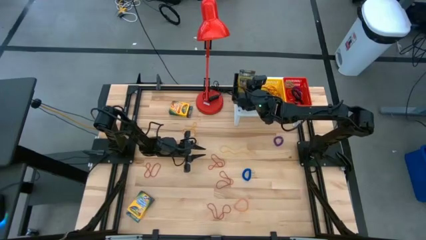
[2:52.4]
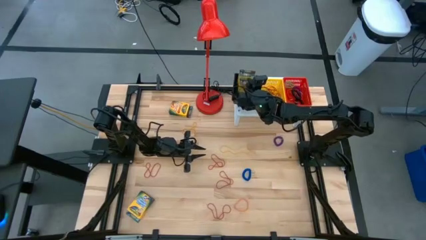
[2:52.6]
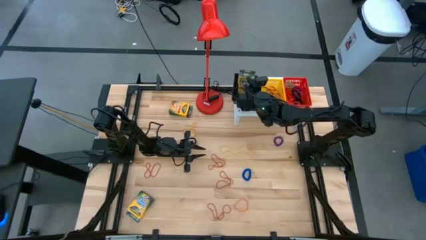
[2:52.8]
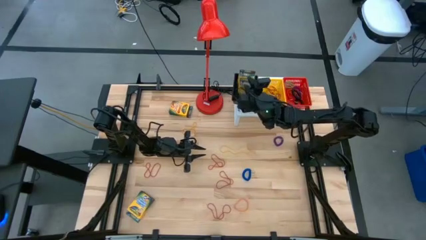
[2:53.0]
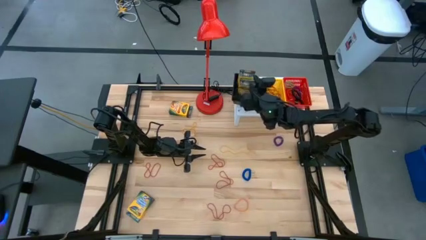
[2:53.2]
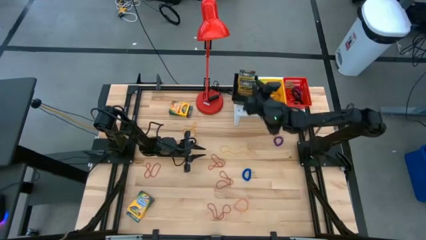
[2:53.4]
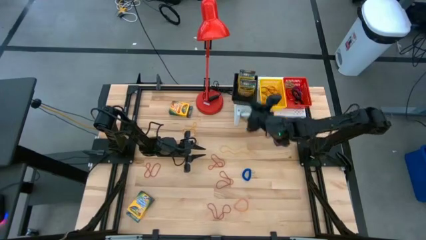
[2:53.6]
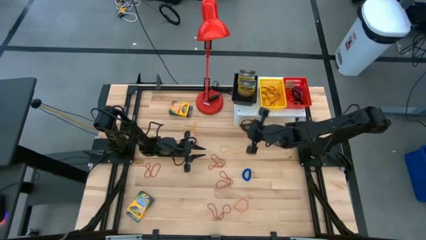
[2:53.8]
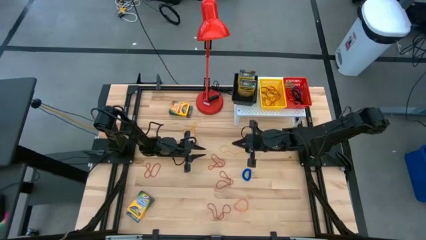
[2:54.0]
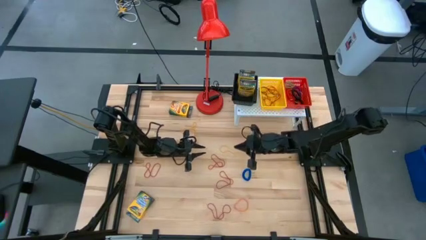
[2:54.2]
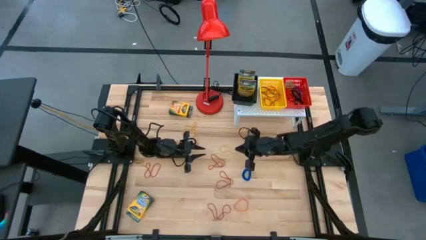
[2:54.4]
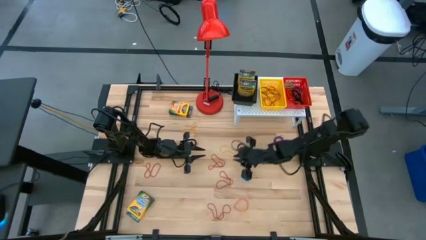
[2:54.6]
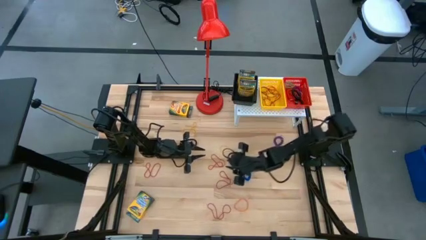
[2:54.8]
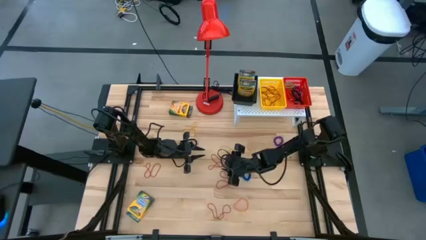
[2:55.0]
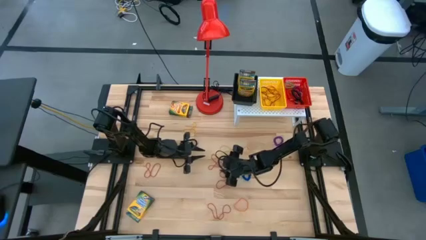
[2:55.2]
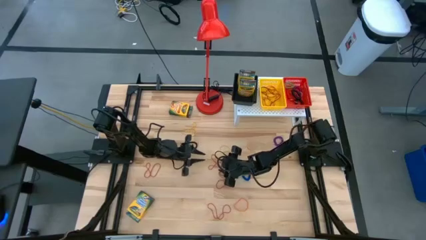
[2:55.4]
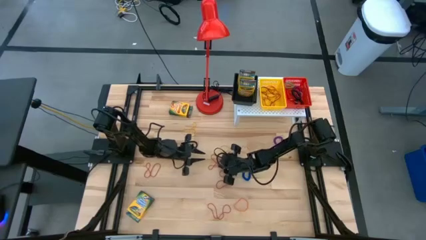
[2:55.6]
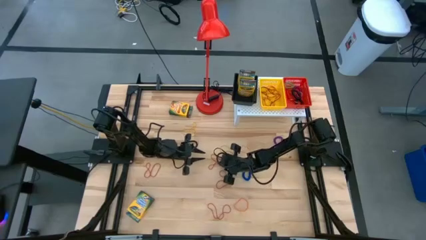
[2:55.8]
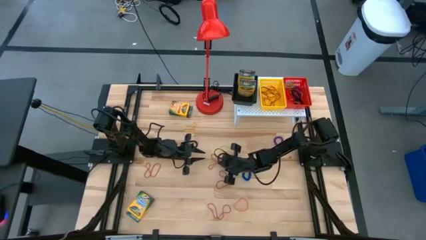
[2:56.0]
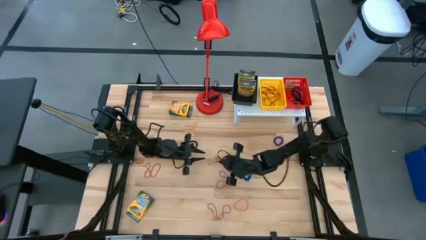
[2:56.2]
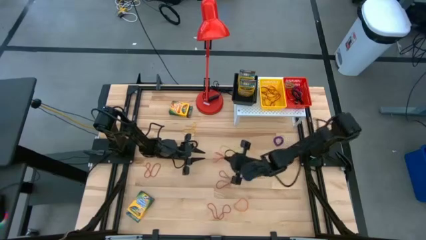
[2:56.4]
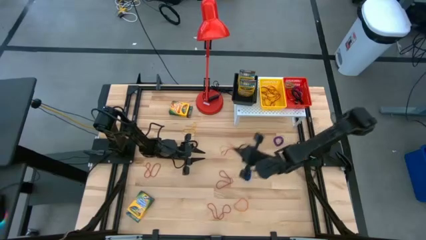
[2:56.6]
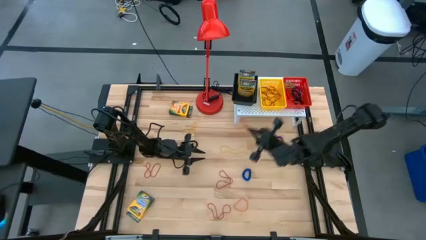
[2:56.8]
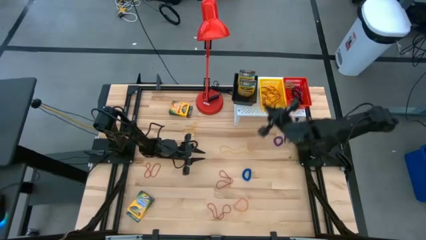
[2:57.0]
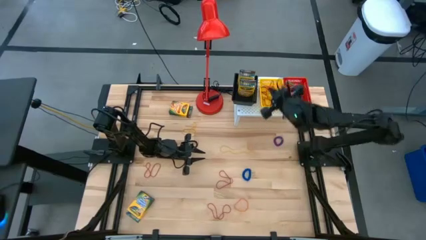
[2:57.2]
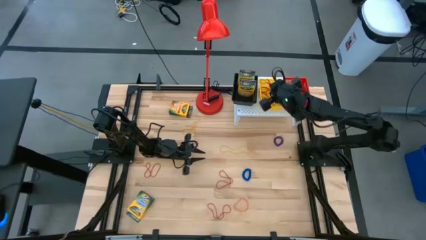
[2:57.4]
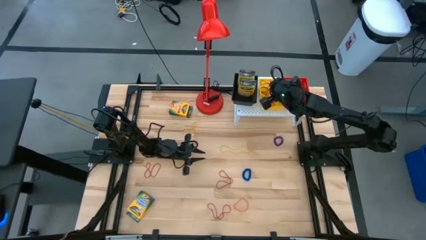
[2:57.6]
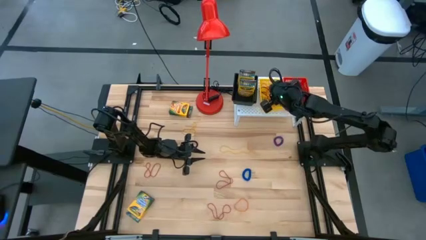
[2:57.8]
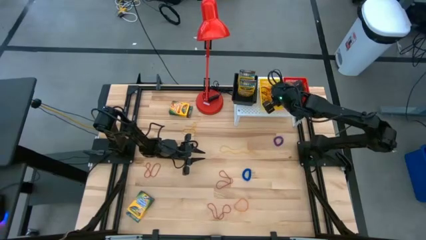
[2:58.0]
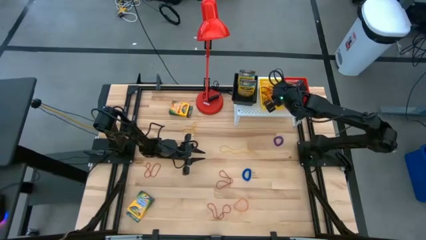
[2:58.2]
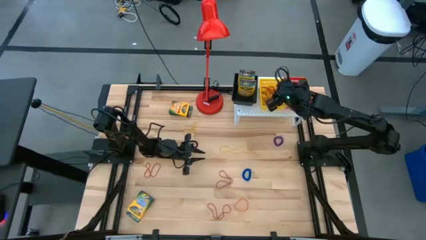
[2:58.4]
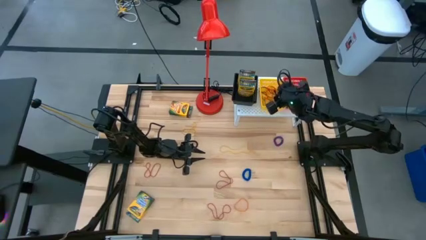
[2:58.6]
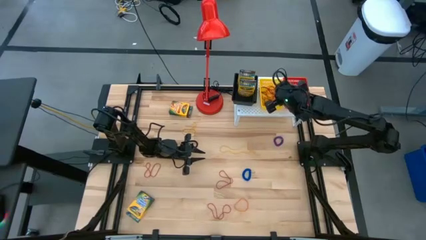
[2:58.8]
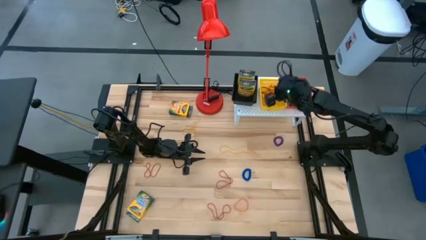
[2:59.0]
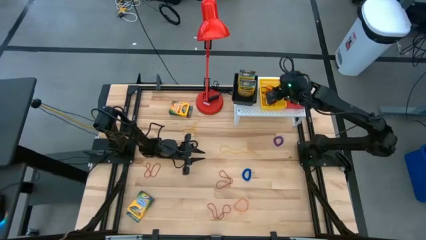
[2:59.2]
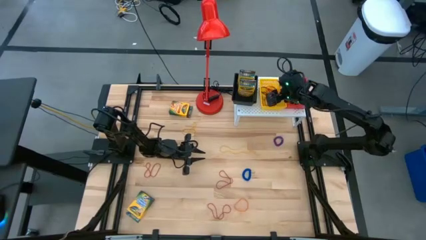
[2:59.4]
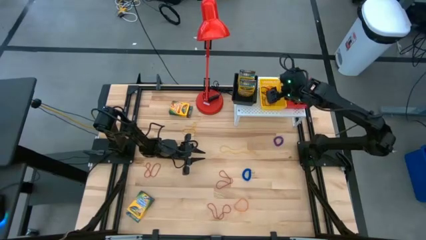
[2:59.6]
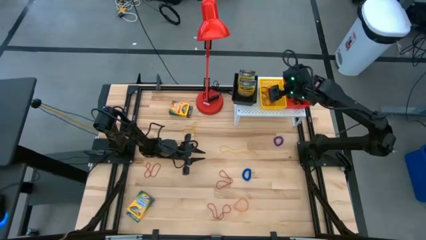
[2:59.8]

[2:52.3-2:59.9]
Task: Pick & Place Office Desk Supplies
Put the red rubber band into the yellow bin

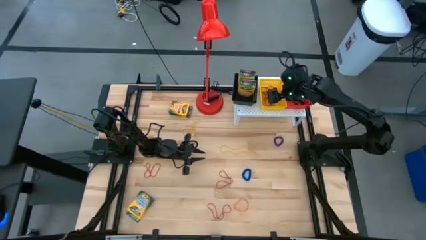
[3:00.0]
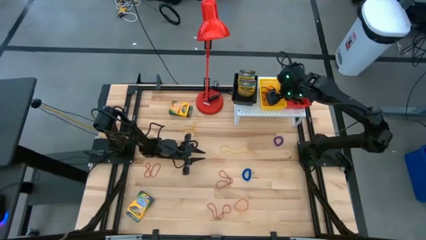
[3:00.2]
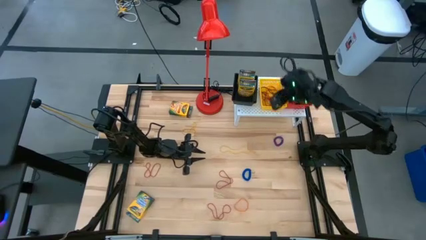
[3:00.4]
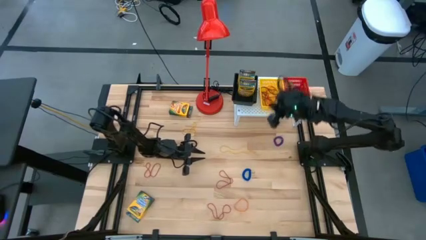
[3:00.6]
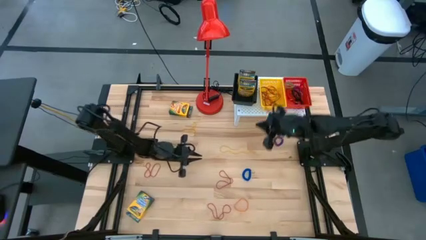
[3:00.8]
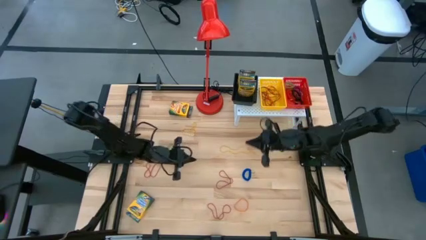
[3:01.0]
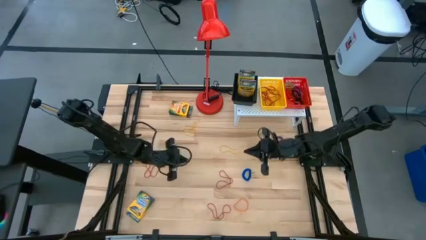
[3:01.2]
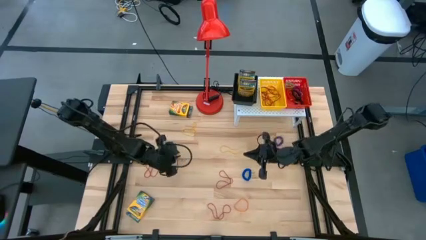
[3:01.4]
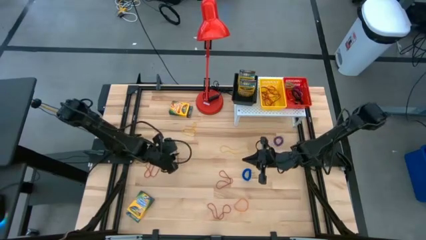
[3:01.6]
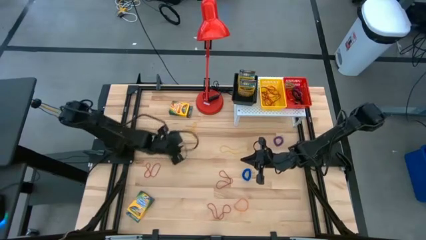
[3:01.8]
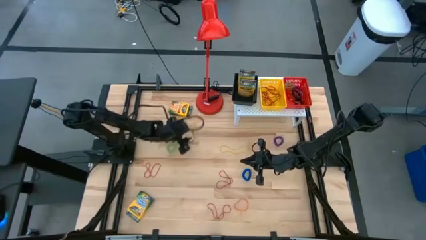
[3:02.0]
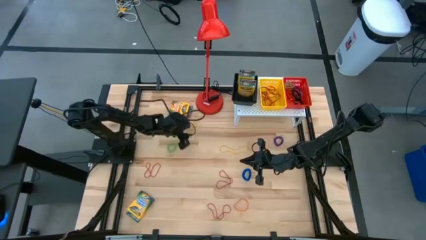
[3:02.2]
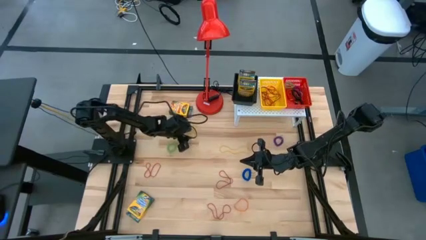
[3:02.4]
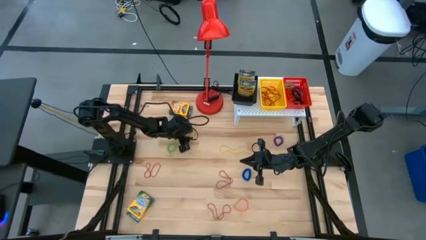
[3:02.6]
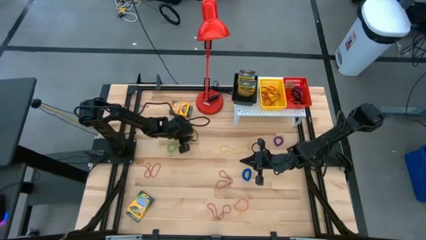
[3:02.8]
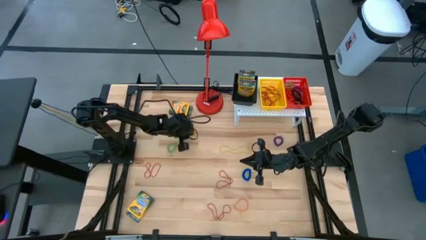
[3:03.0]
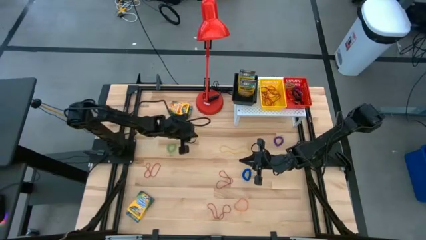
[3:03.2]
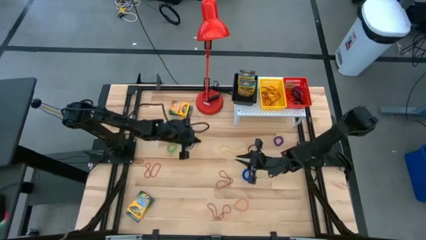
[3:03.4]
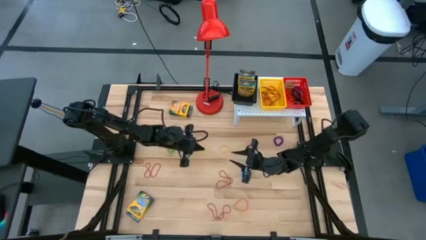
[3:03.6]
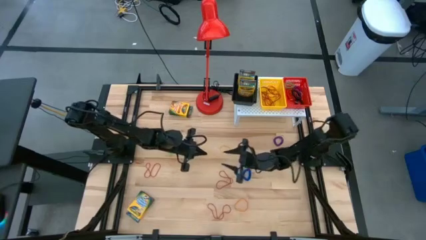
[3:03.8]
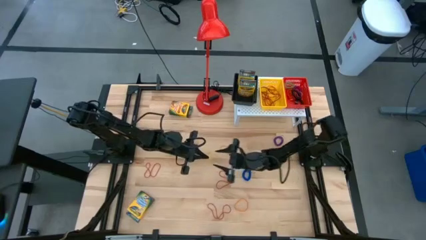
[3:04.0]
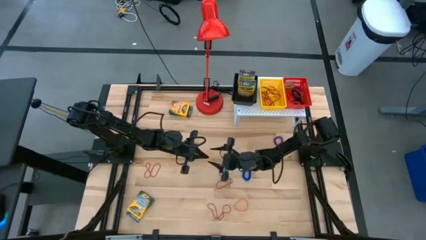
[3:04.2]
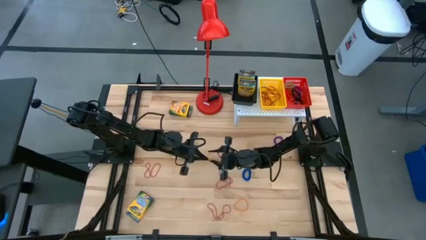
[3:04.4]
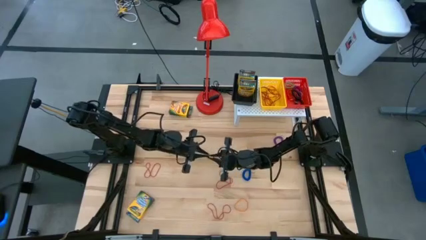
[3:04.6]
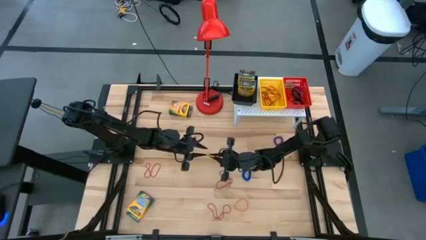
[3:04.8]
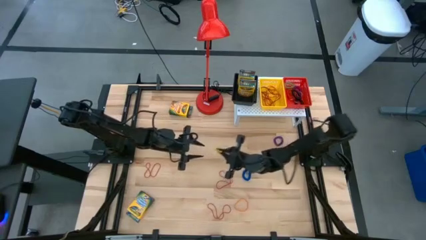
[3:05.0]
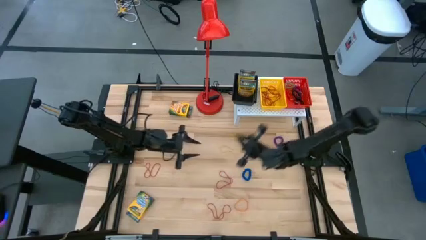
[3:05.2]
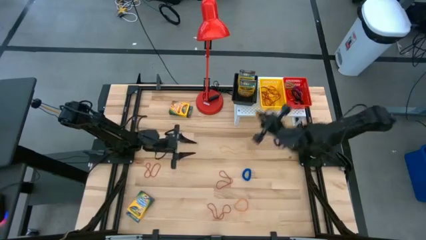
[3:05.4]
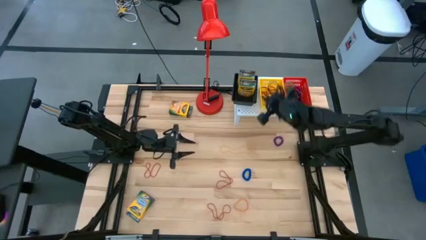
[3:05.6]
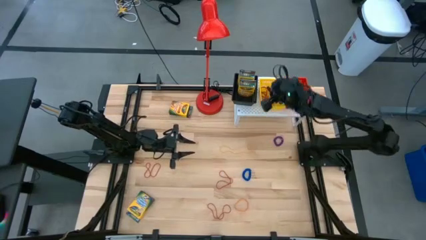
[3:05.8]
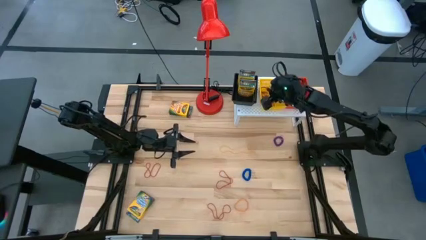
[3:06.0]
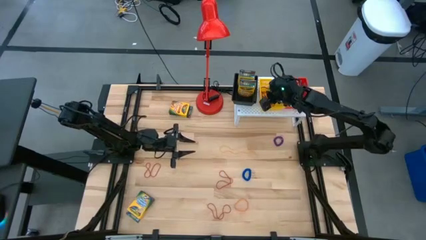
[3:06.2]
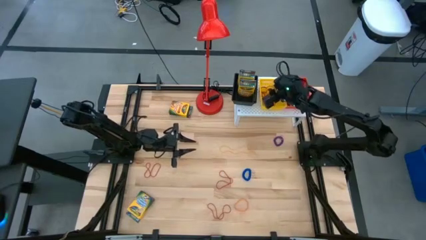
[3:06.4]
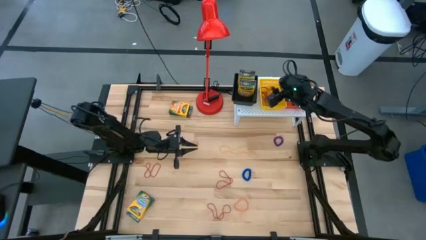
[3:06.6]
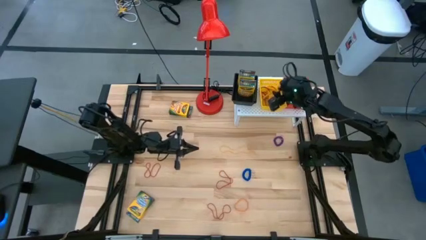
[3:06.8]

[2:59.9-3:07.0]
Put the left yellow rubber band into the yellow bin
